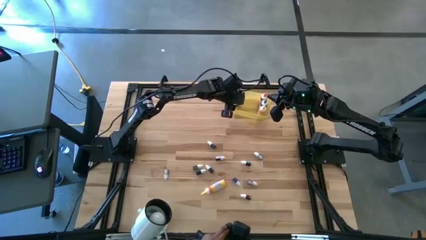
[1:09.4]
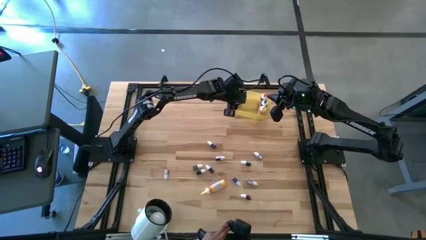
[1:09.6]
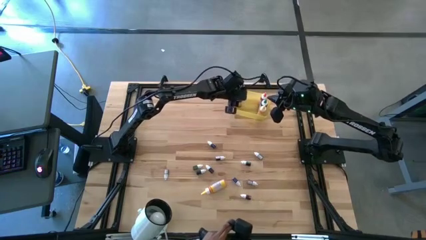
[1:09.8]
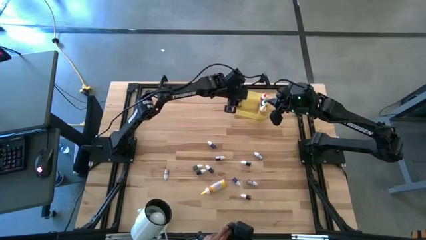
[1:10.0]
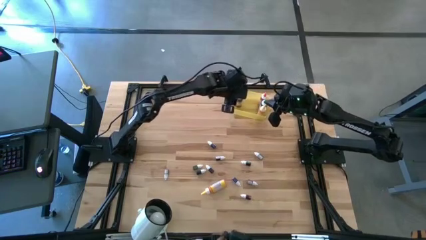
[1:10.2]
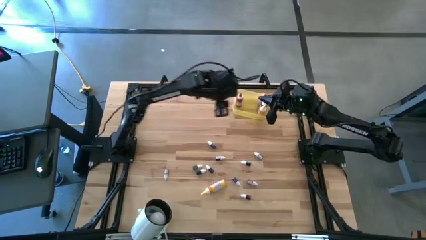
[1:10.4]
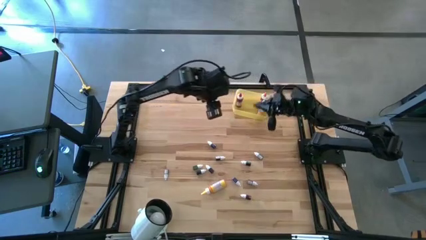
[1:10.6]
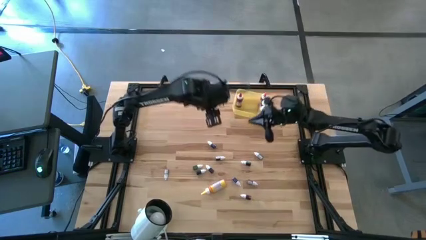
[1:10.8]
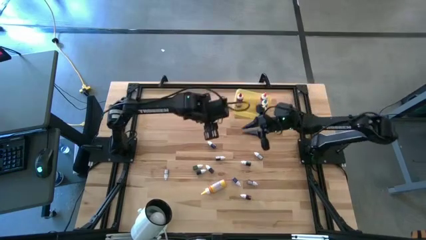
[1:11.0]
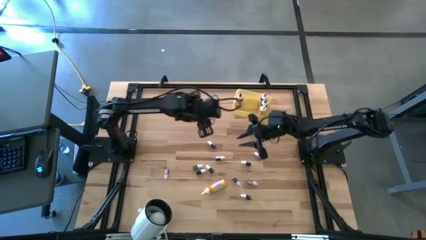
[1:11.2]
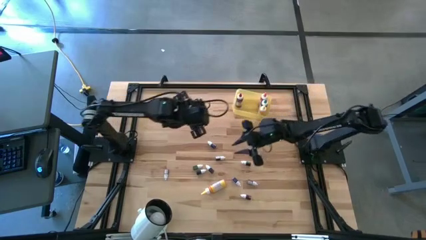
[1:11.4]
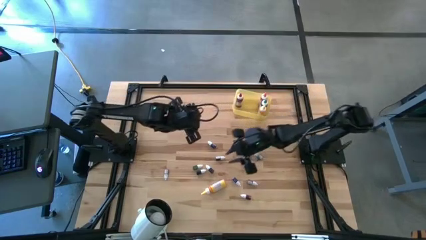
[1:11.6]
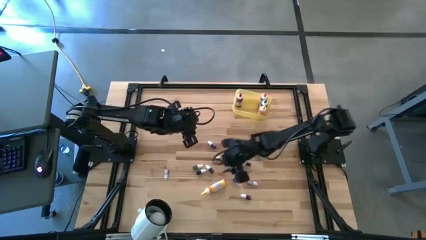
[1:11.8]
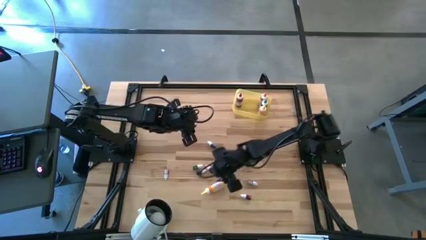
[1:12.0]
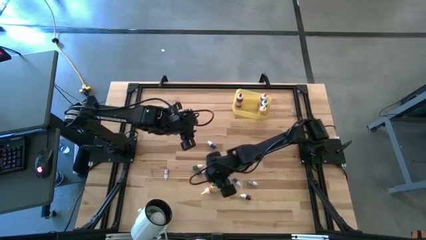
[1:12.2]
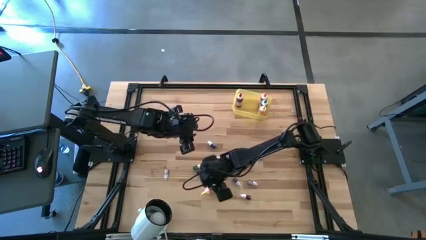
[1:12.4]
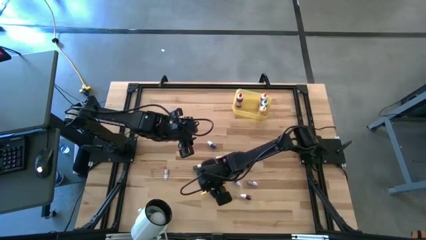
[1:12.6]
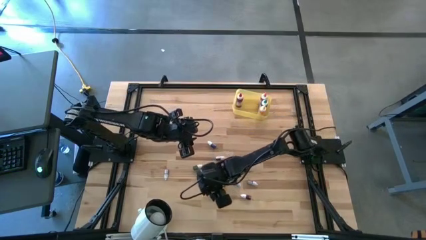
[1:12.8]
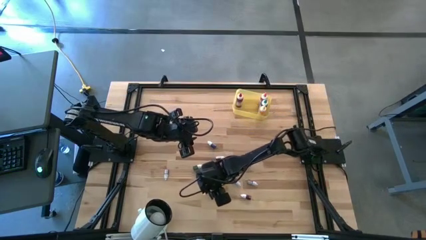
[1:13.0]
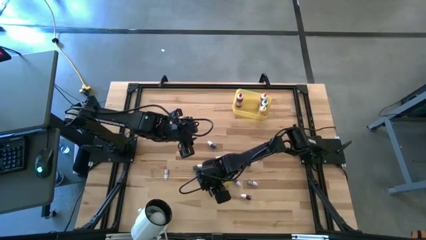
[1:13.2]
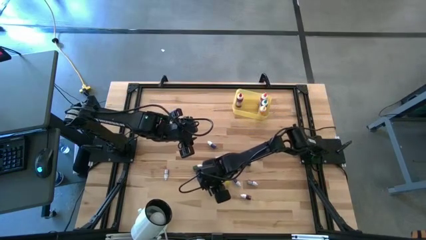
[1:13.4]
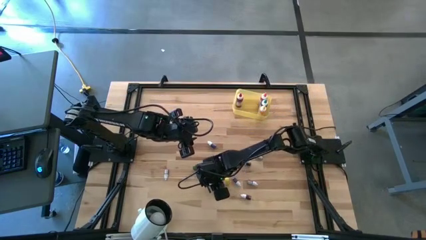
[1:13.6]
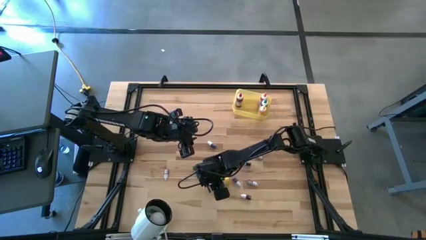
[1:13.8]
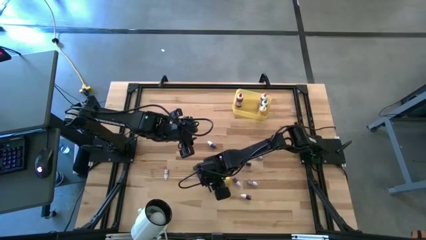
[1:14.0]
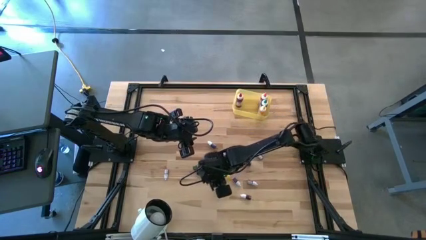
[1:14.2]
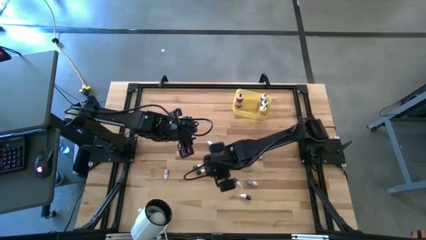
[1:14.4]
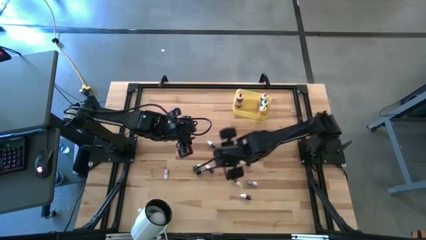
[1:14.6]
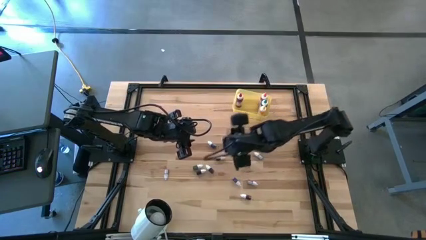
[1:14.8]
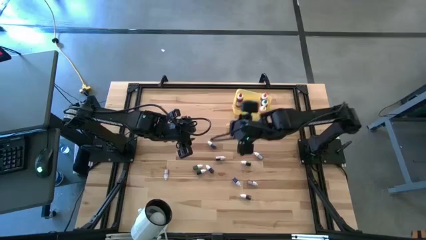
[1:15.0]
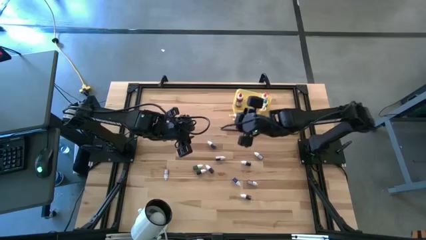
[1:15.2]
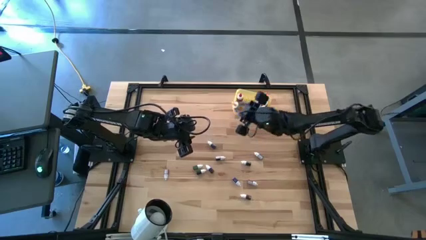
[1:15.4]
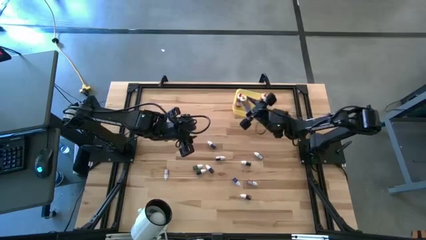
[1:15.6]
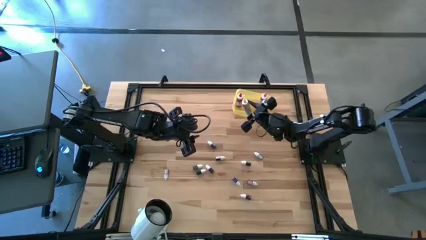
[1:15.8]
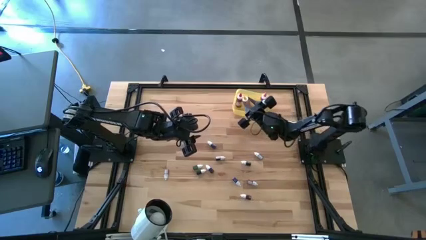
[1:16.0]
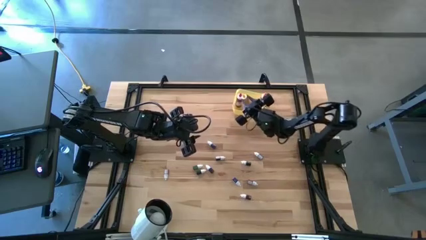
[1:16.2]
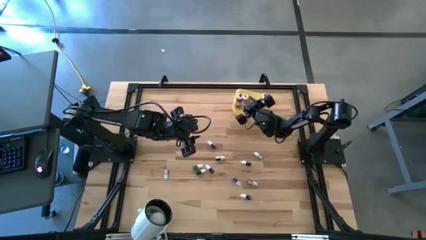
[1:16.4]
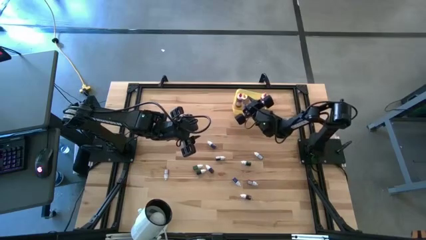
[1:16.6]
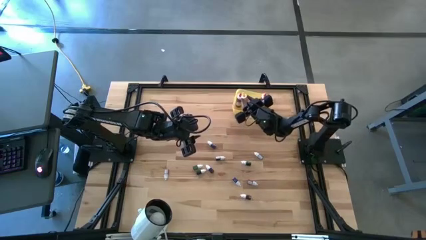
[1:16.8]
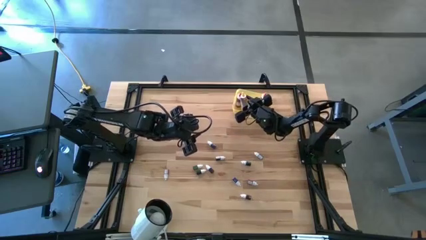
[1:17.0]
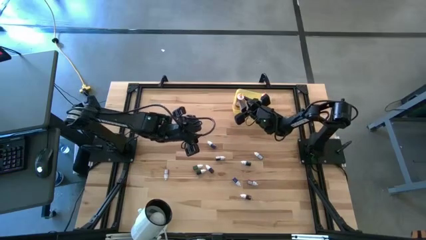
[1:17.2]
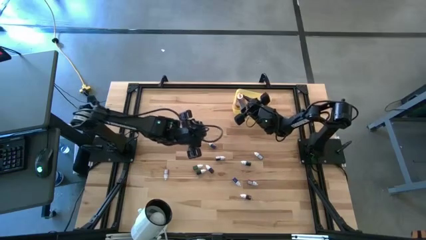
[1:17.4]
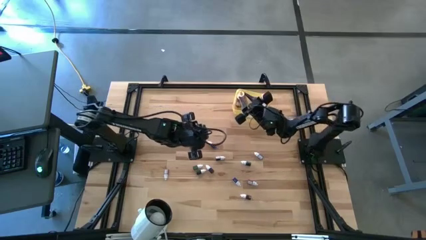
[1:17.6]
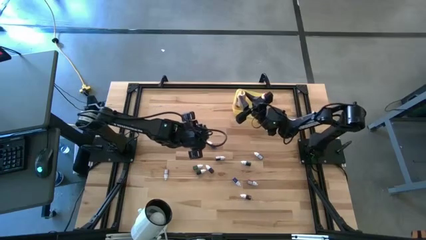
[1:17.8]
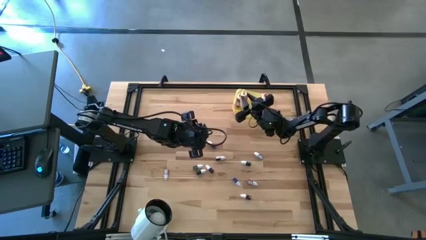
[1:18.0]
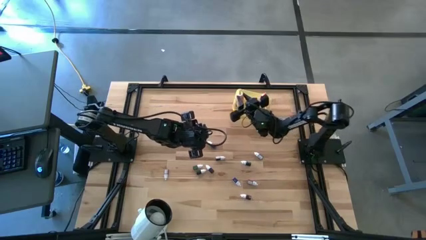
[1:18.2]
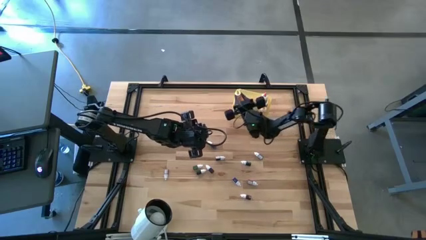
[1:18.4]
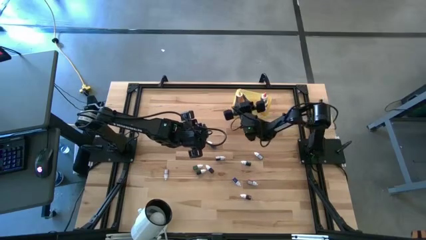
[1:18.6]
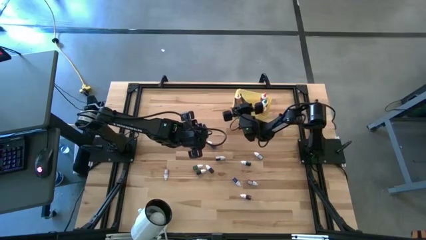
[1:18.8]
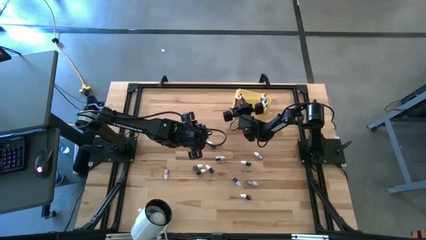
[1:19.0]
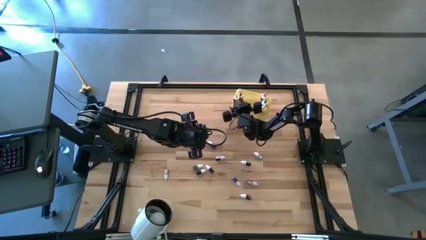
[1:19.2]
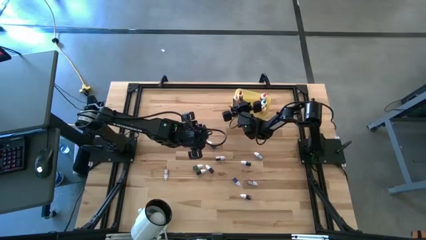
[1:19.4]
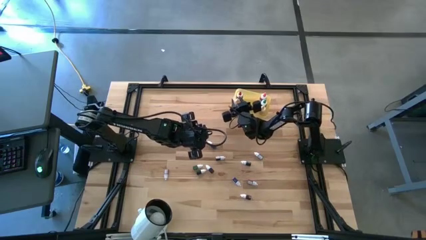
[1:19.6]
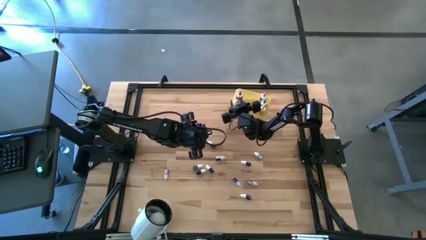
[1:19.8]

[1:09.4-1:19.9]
Task: Pick & Place food coloring
Put the big yellow food coloring bottle into the yellow bin

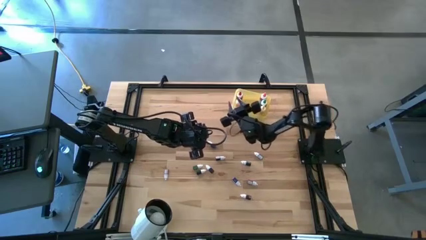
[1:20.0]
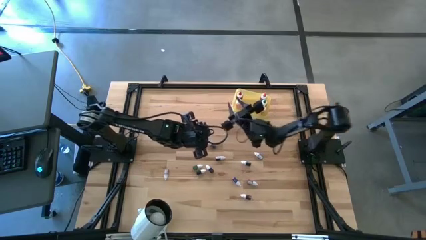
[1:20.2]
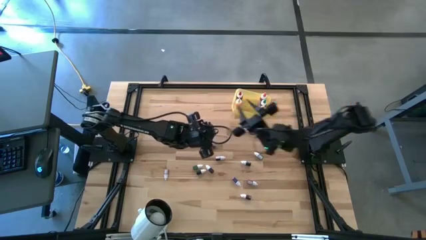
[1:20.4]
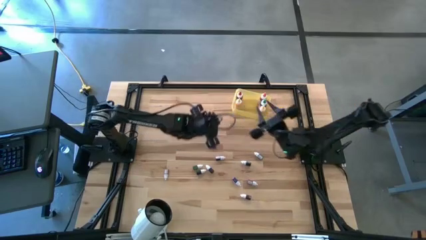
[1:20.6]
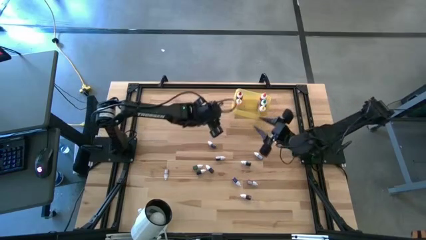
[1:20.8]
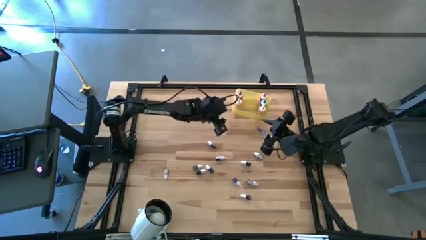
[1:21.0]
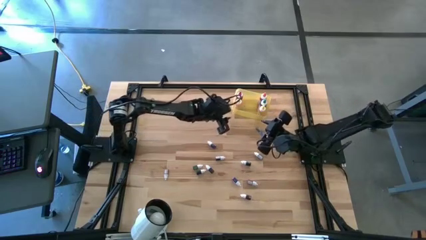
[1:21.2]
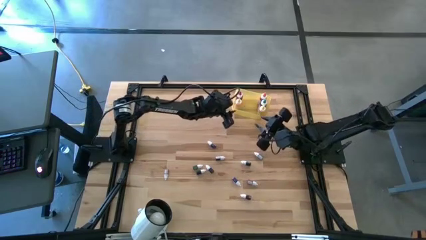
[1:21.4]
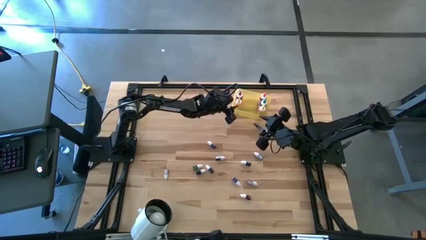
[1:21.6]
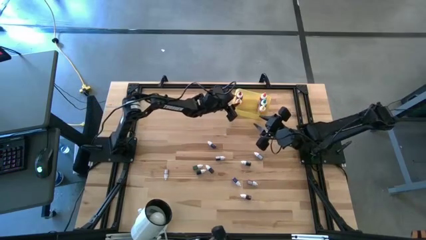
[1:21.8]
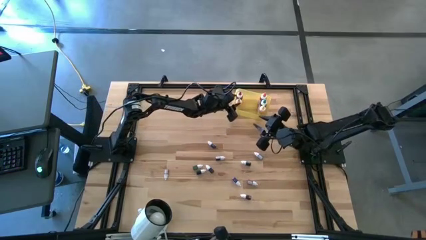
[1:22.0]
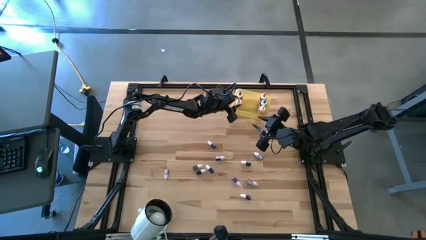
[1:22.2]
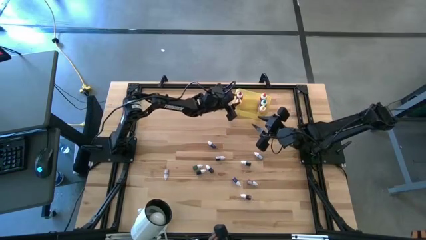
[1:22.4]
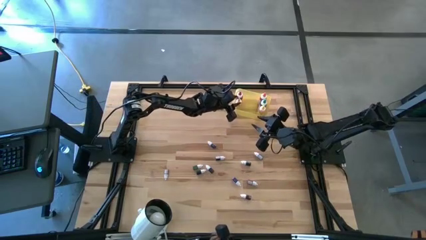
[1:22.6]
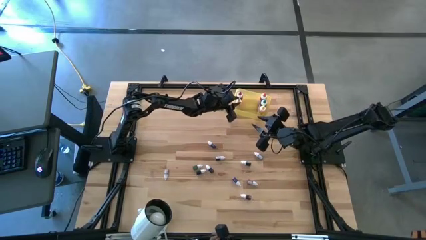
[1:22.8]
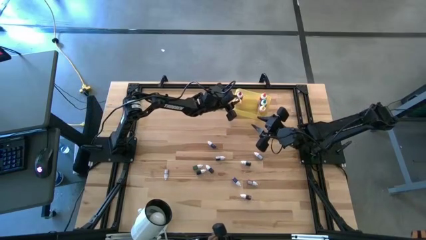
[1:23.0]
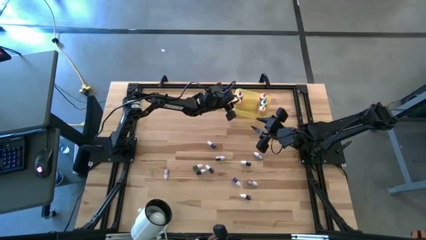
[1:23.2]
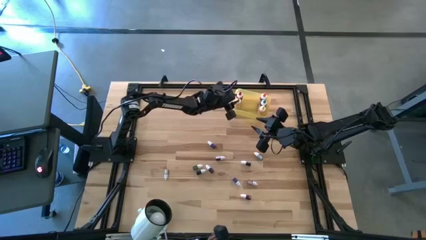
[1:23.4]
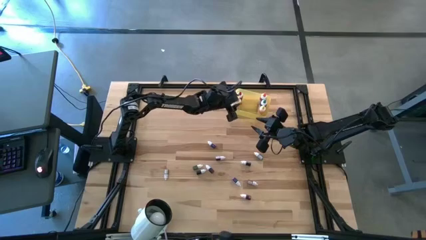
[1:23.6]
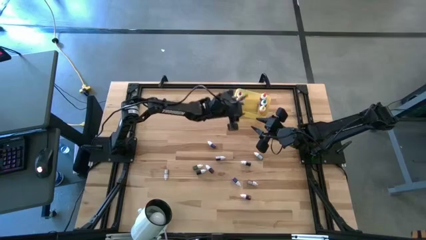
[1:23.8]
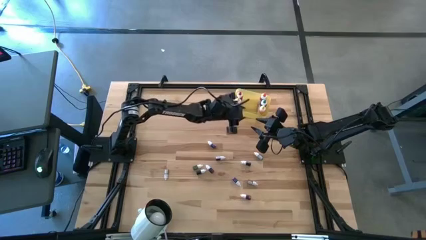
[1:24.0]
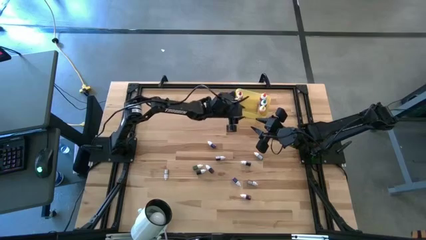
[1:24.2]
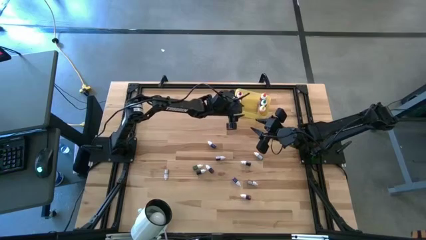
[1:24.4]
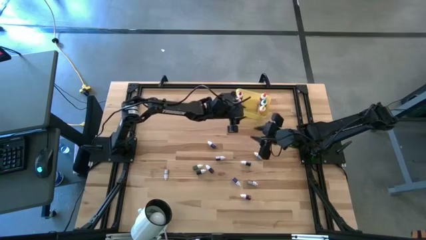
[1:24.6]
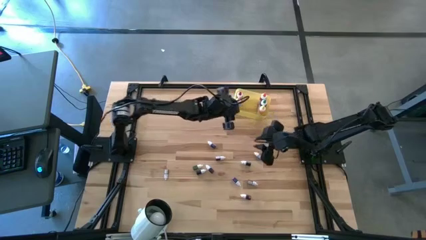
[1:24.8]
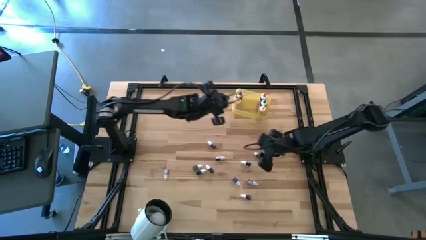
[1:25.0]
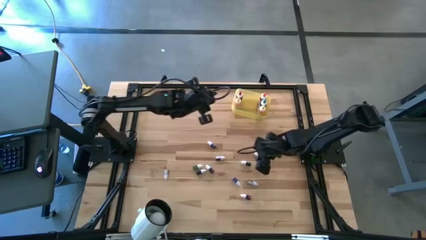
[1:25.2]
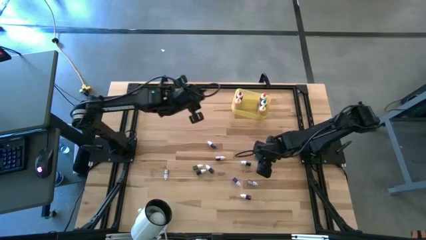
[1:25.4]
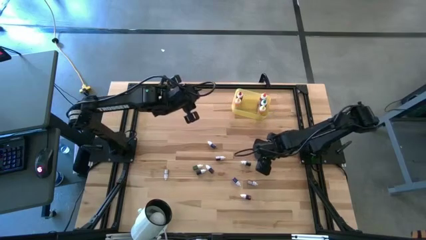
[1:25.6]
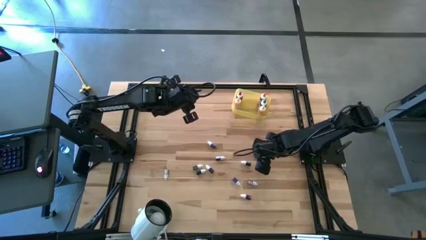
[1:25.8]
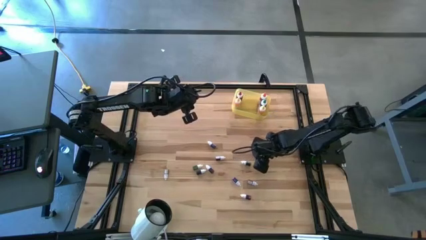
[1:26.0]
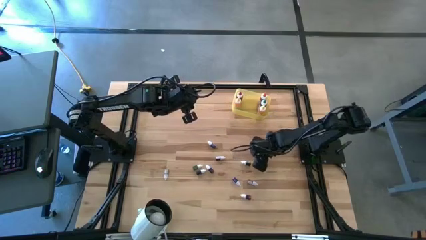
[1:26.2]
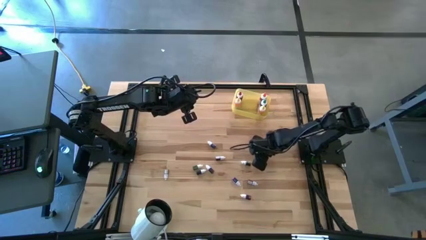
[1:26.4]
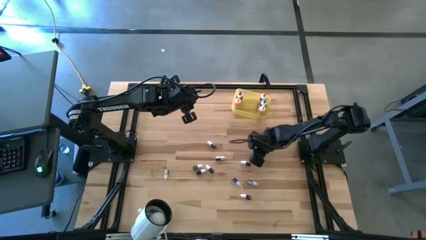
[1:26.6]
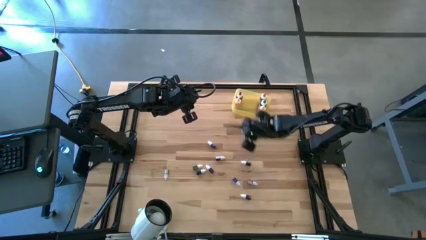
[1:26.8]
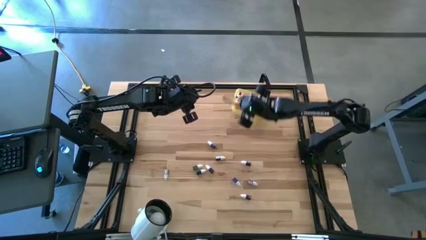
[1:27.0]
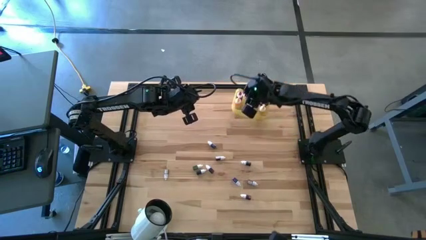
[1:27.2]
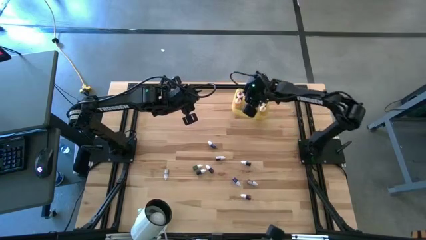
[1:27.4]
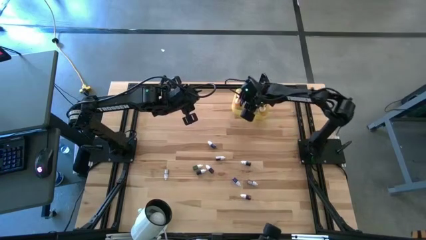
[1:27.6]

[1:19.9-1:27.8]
Put the small blue food coloring bottle into the yellow bin
